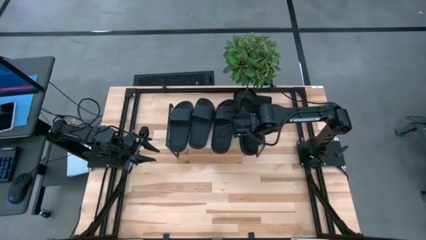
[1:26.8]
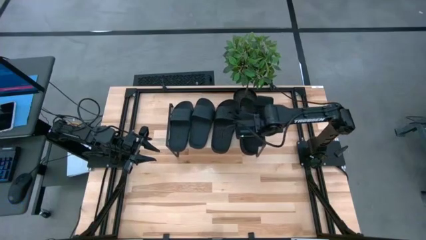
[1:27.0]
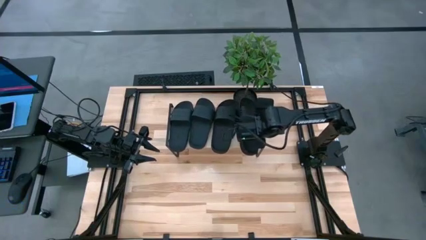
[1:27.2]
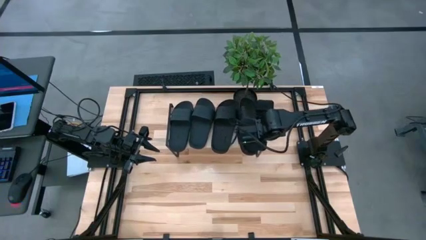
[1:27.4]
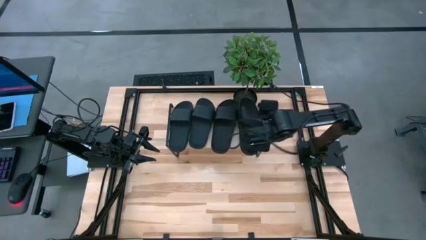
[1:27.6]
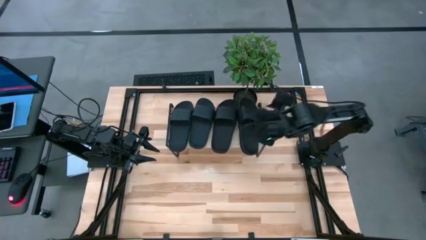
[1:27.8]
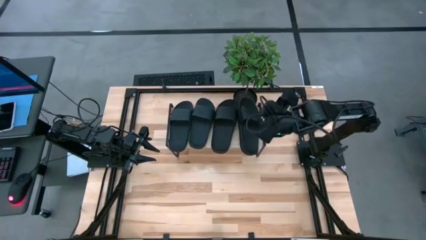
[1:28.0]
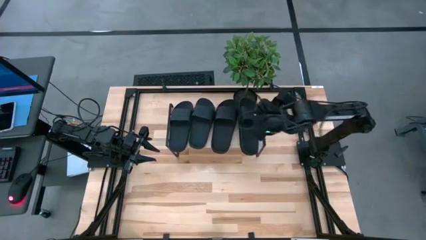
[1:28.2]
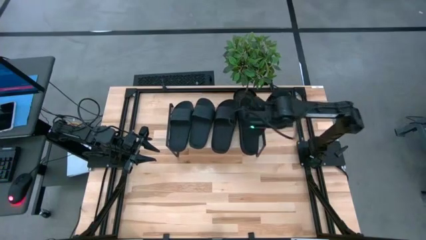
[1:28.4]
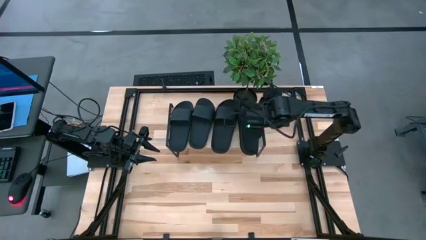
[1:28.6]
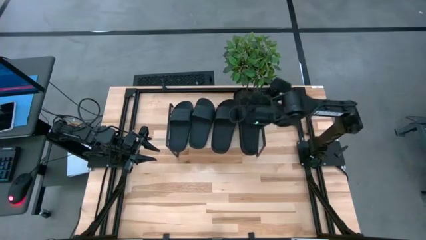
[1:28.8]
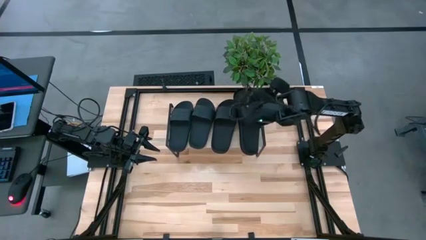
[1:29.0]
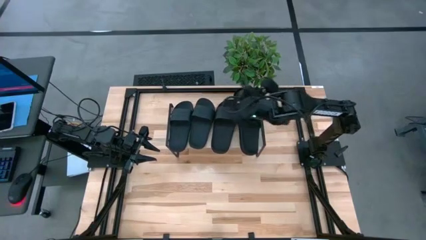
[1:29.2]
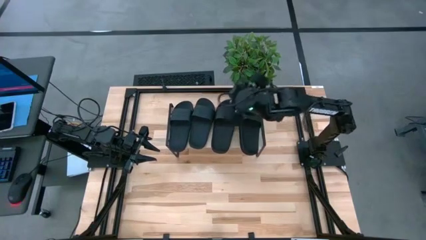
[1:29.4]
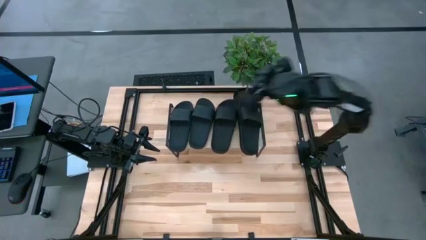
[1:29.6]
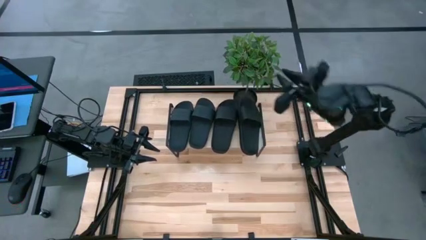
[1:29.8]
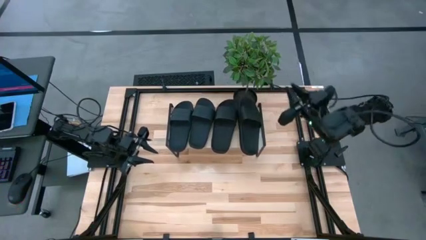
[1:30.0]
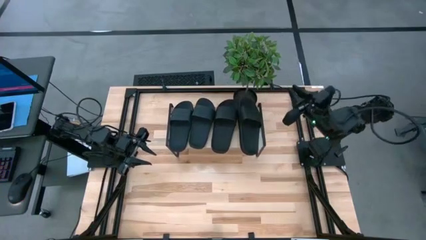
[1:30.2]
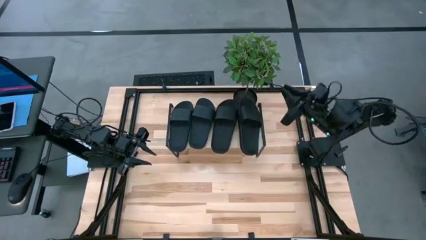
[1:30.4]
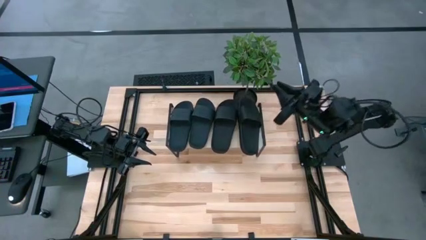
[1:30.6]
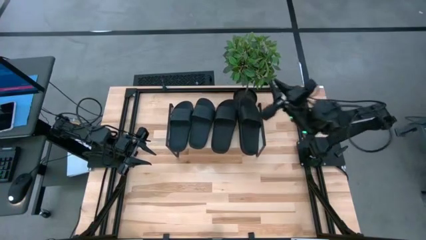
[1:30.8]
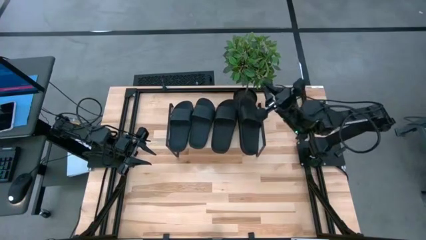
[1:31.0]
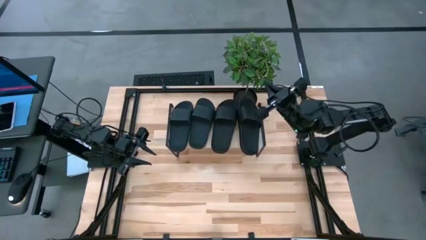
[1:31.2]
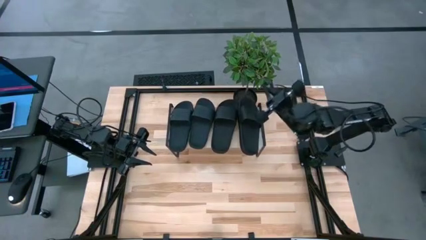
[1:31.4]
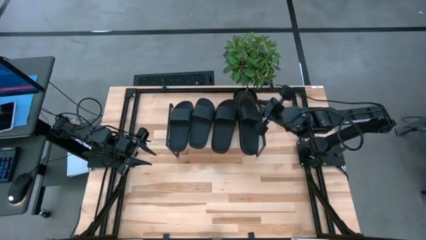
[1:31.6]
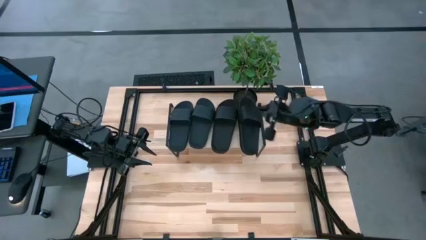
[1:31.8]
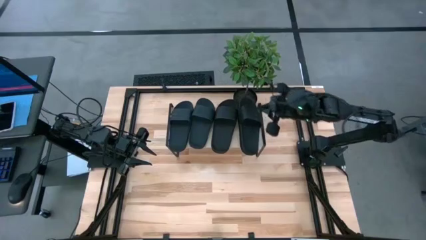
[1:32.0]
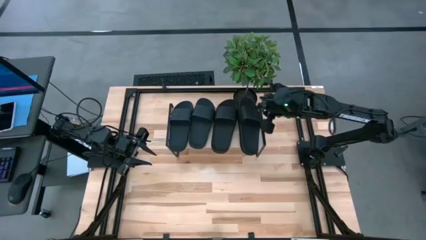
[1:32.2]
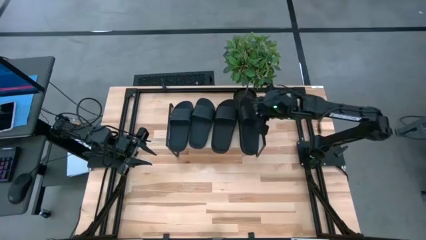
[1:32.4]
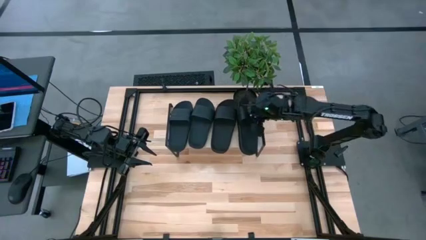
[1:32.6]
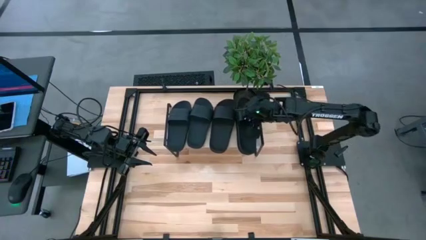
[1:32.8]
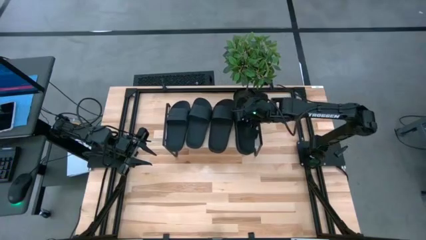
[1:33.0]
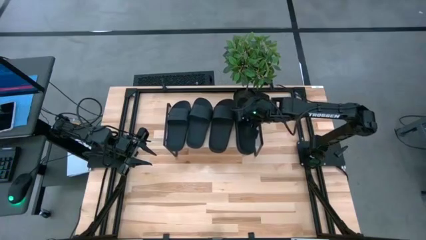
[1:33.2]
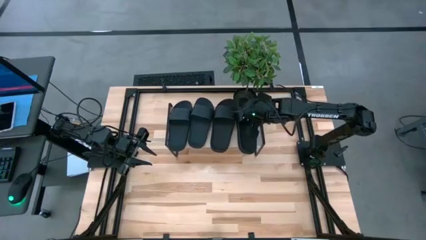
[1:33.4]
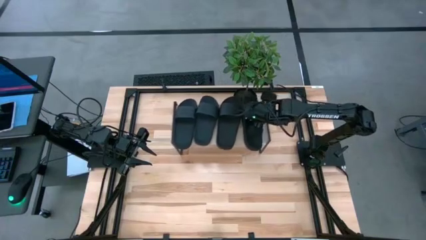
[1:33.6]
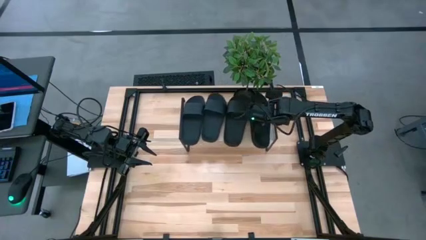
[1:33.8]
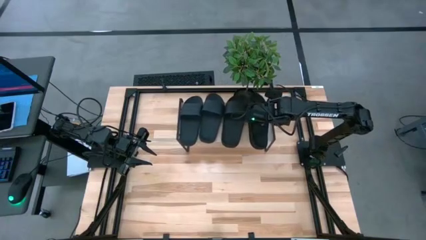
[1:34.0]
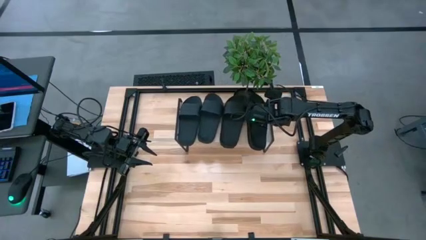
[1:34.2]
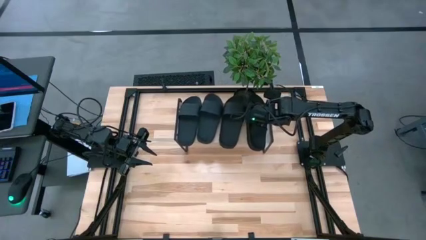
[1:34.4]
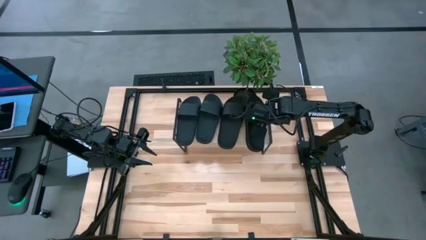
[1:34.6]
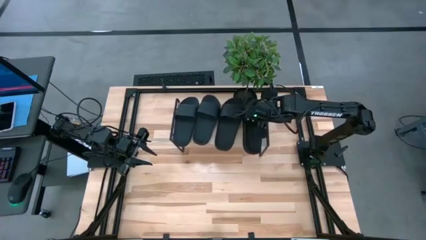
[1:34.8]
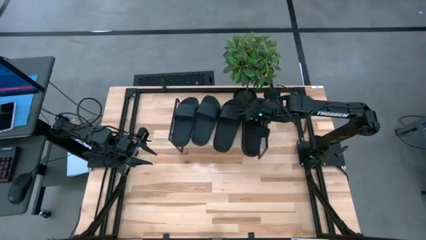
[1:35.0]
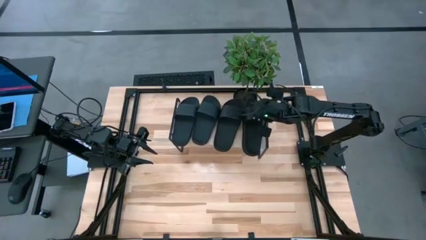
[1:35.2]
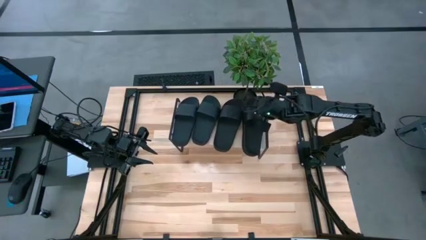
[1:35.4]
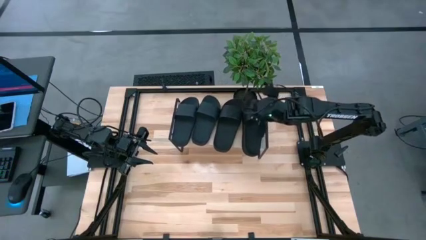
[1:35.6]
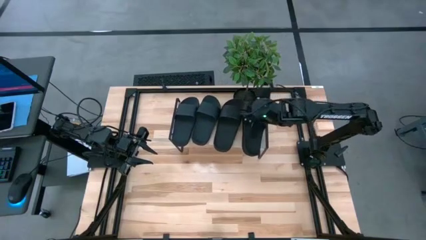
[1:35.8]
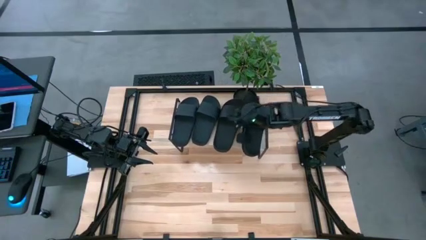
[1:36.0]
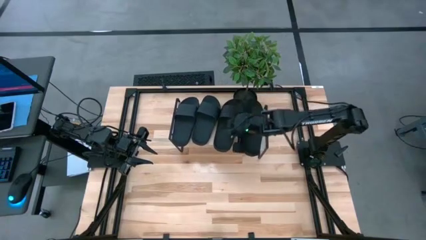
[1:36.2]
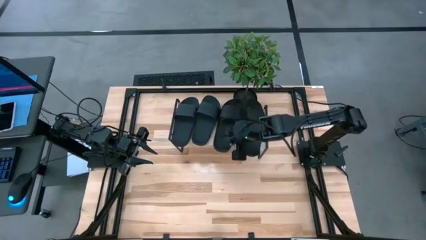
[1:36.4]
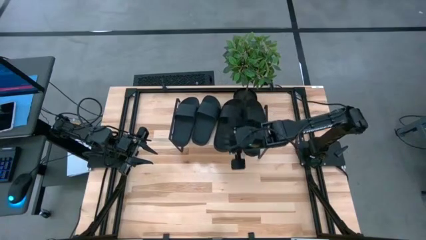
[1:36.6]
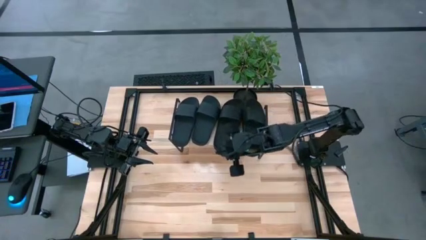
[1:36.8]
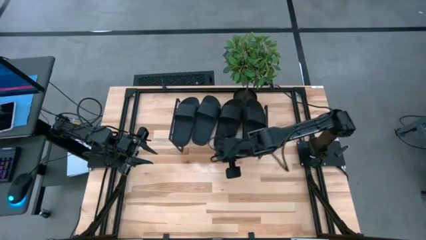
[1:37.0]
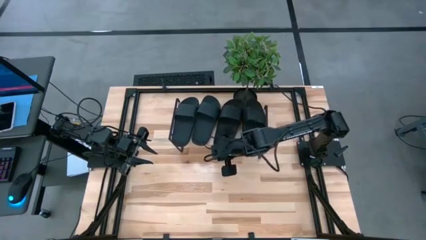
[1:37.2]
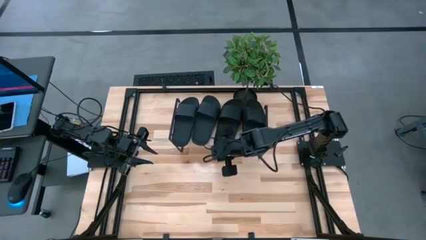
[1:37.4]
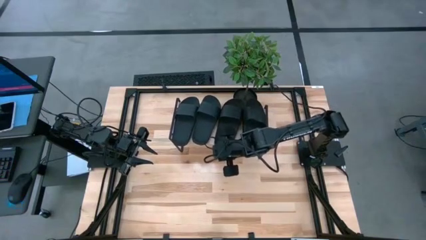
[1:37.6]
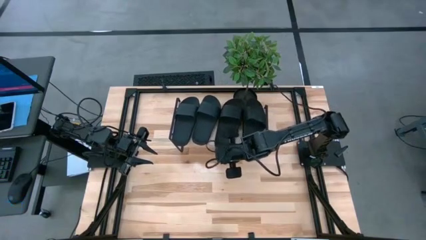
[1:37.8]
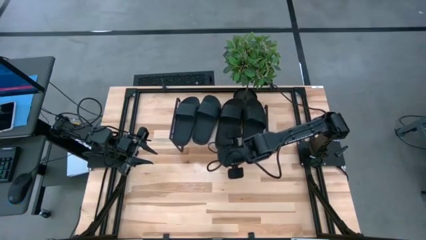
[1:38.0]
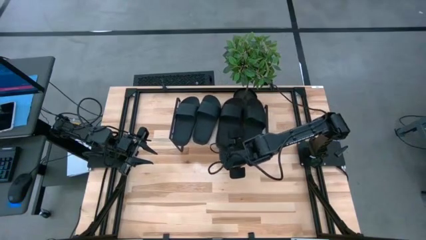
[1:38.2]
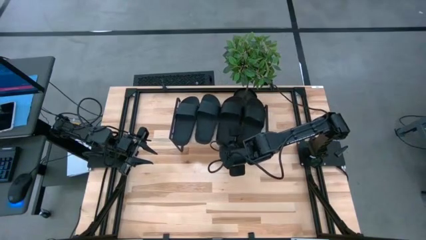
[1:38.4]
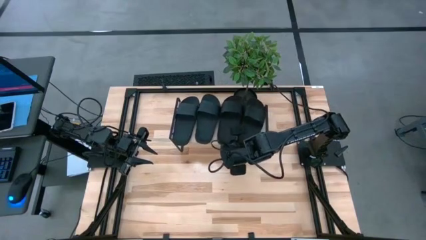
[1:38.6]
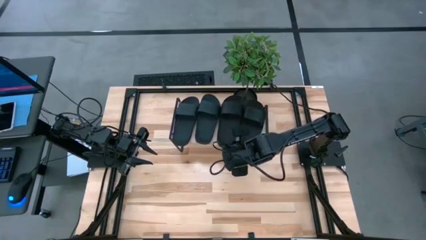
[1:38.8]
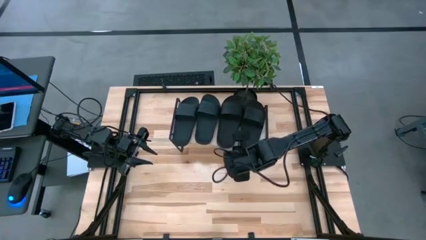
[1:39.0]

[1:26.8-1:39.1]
Task: Pick and place slides into the shelf
Adjust the black slides on the shelf

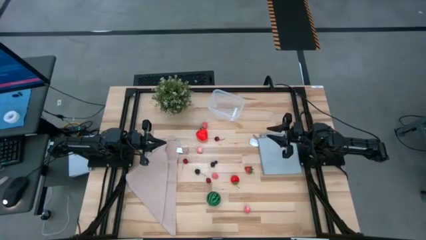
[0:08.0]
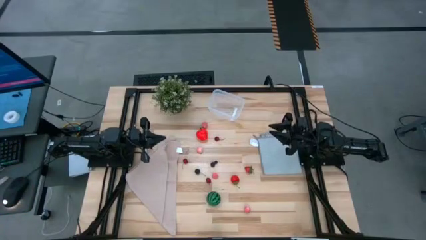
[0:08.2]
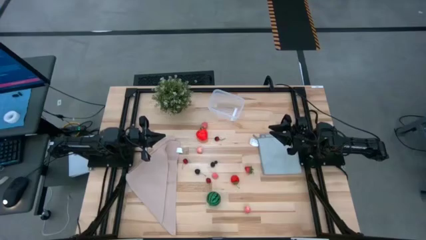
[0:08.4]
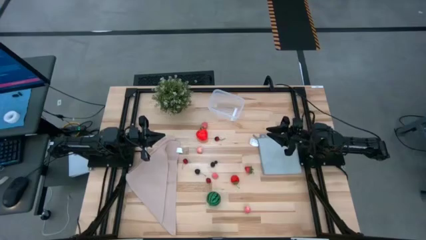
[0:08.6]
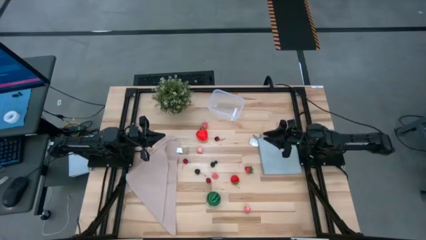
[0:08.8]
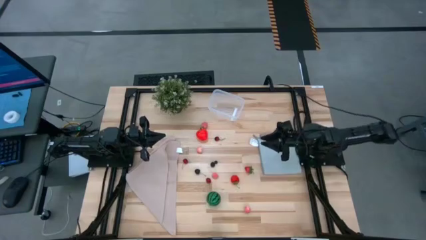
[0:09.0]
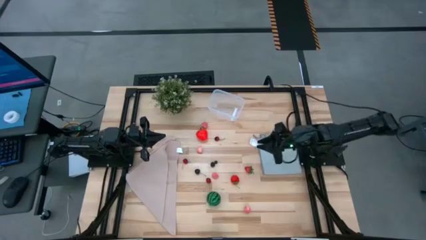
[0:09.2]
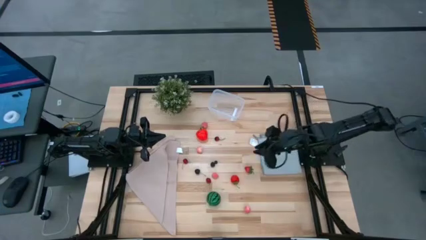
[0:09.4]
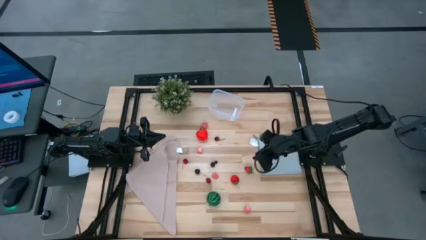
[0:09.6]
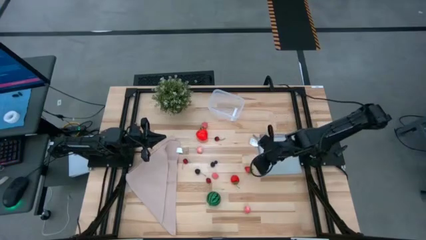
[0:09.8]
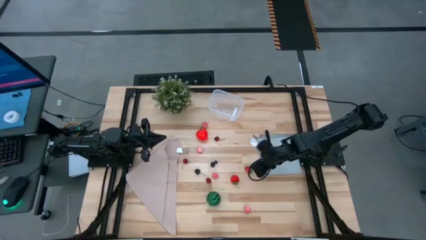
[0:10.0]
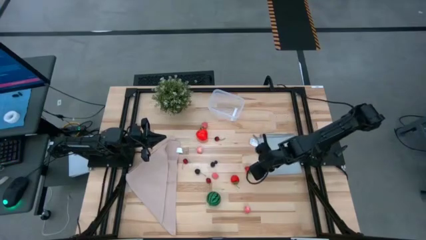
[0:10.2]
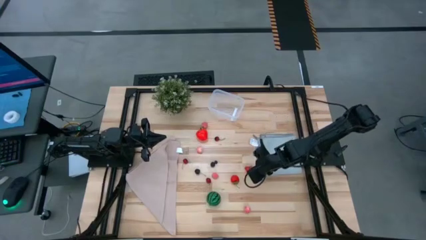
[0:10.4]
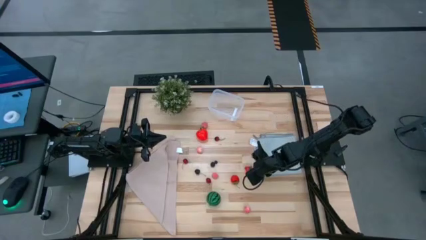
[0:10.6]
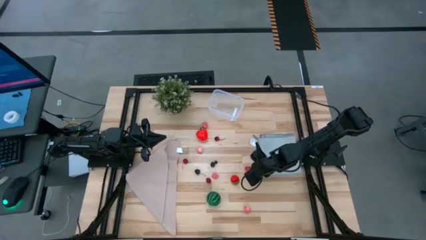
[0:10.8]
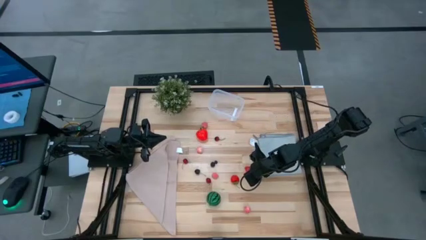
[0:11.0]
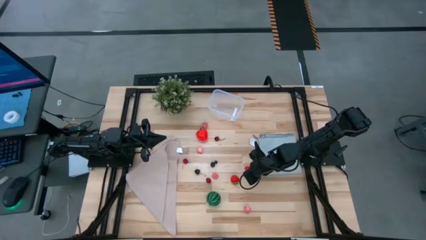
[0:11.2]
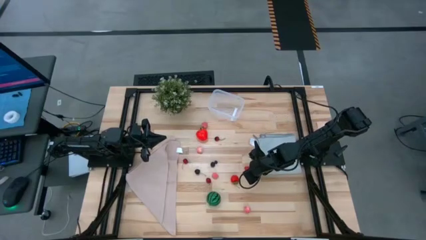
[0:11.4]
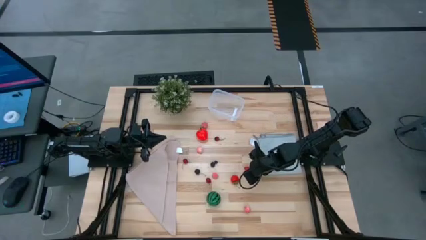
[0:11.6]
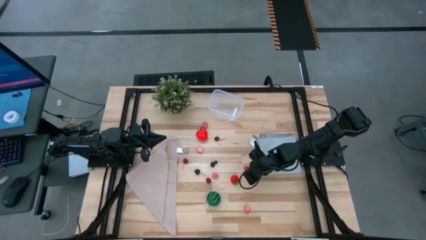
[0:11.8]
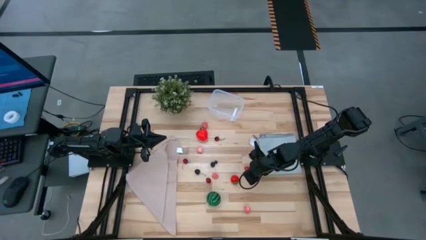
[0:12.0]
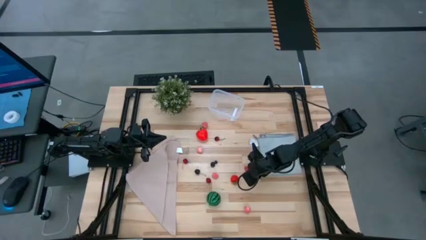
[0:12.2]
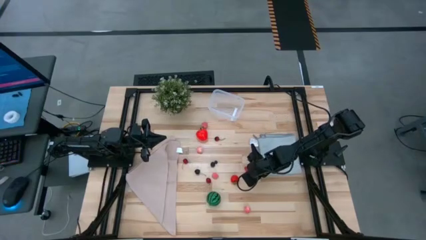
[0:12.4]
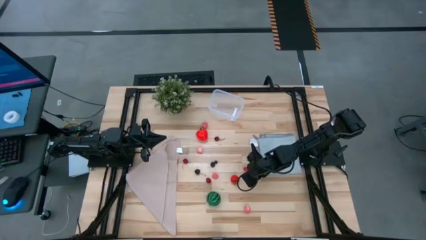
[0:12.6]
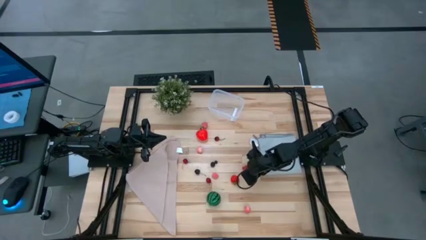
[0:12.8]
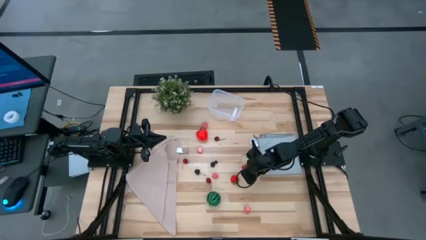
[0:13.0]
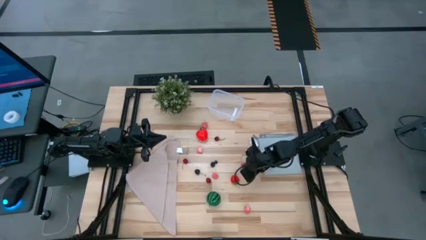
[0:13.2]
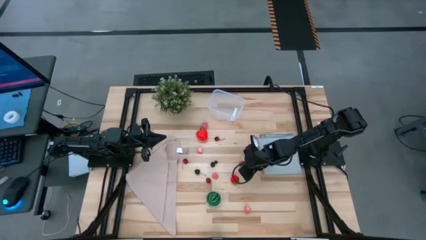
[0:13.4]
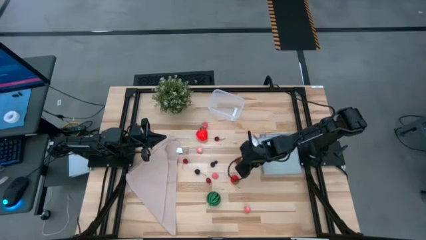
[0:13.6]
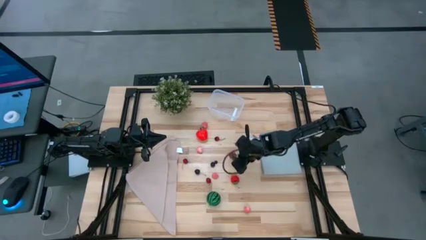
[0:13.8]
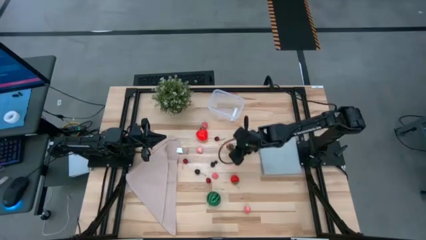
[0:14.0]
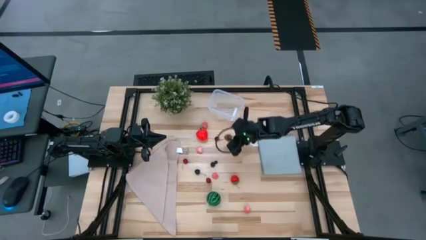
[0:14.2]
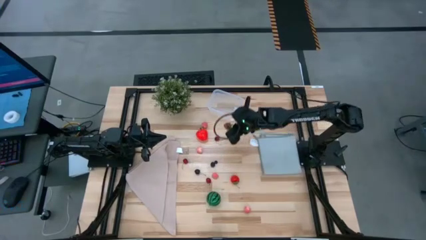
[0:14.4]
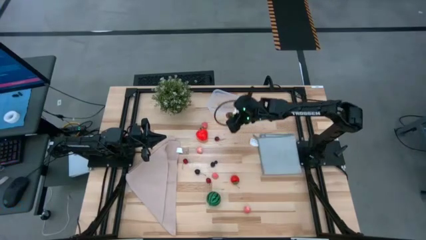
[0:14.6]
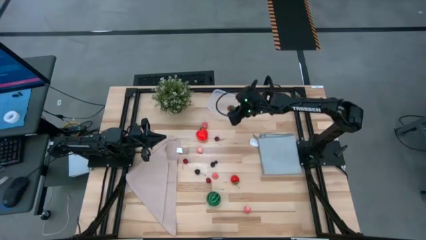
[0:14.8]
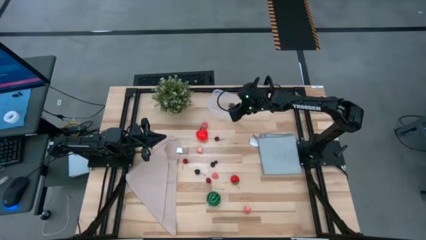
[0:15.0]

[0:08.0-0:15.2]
Task: Pick and placing Produce into tupperware
Put the strawberry into the transparent bin
